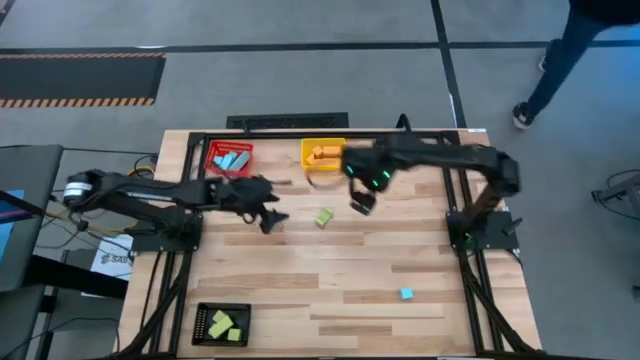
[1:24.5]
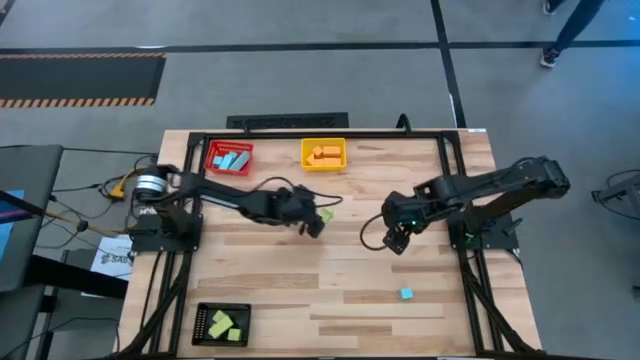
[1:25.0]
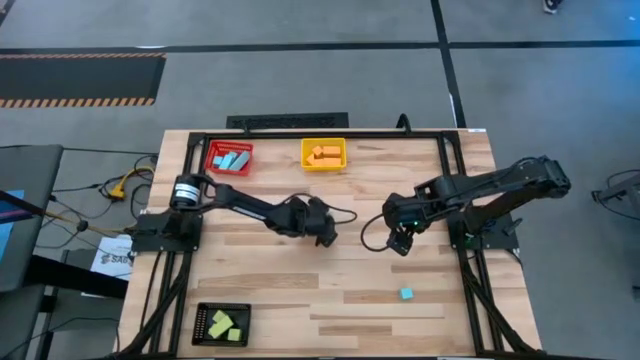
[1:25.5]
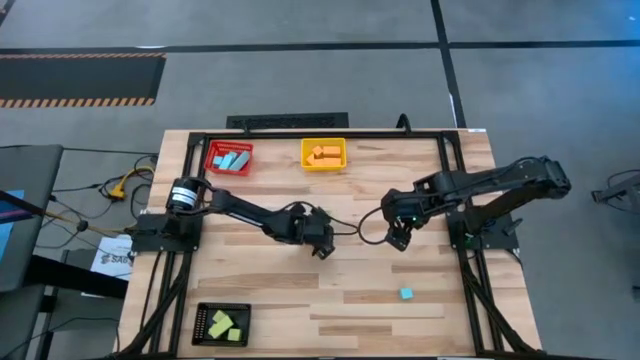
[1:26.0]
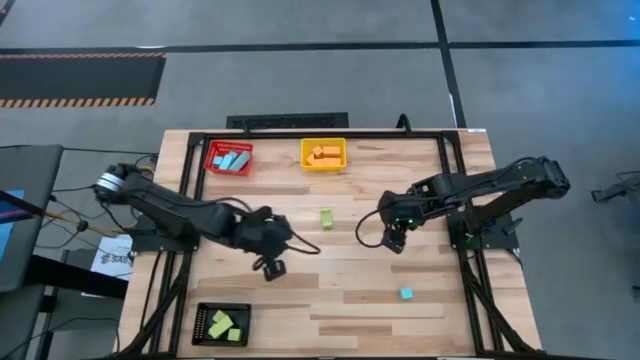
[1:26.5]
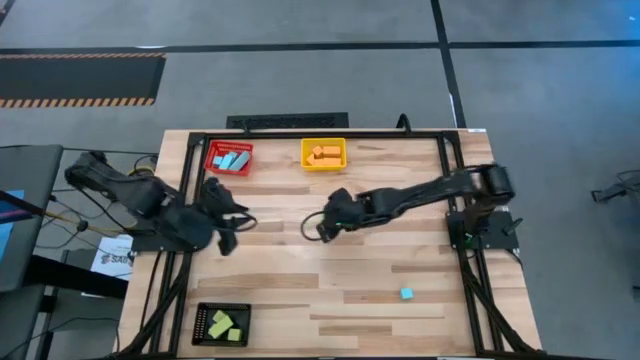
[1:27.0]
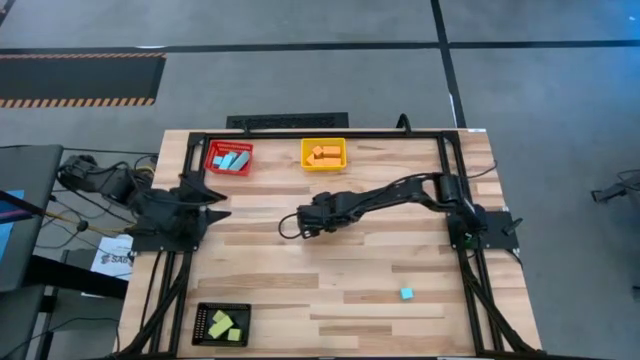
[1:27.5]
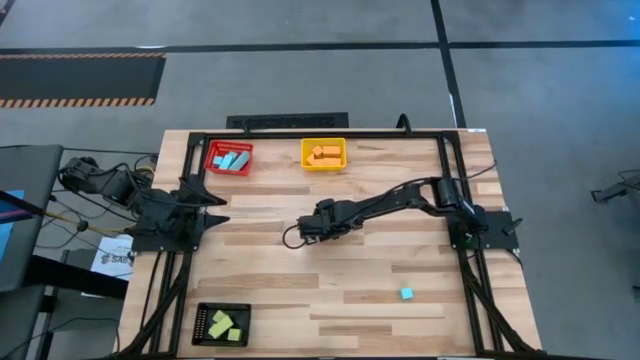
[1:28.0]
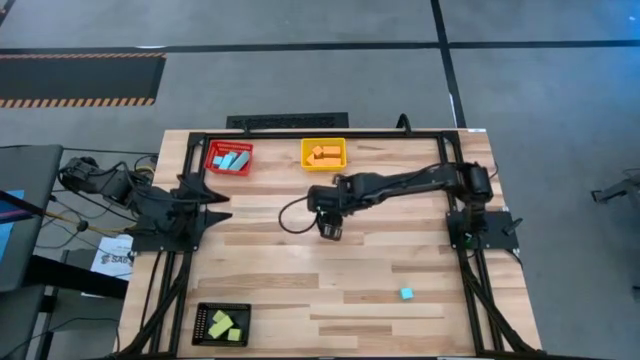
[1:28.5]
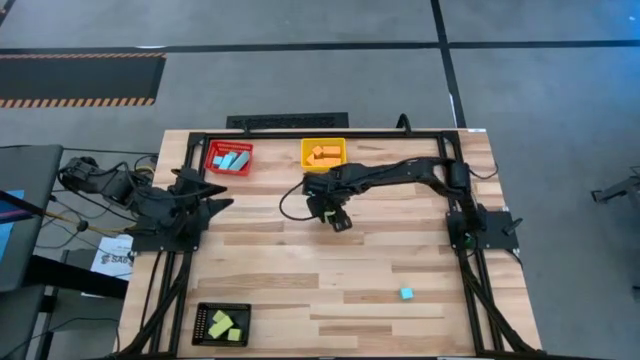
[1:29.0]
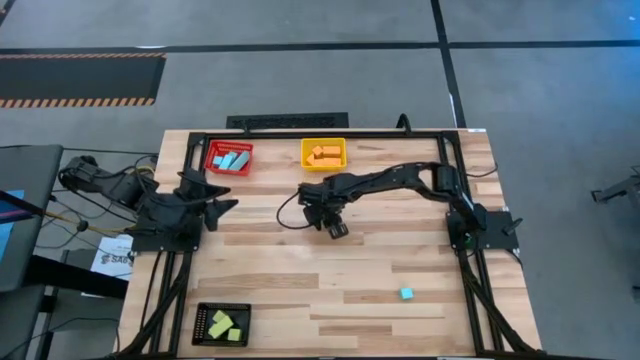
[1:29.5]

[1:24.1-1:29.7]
Task: Sort & place blocks by color
Put the wooden green block into the black bin

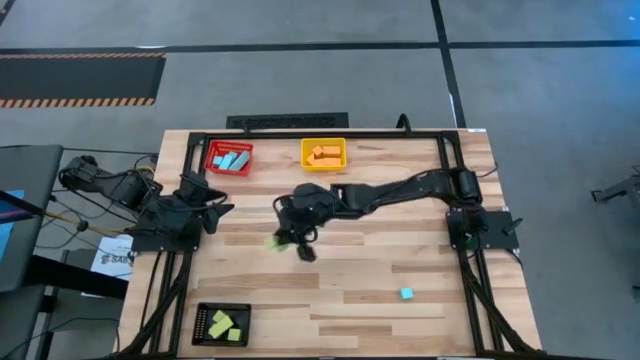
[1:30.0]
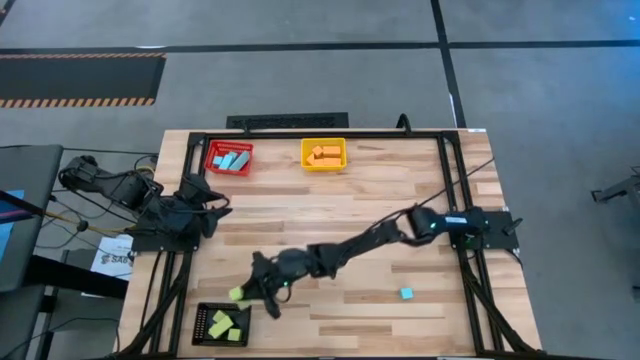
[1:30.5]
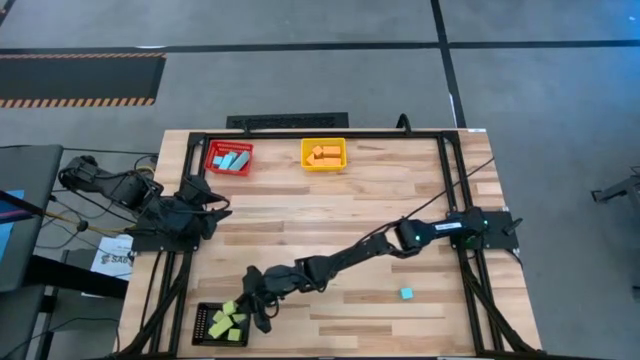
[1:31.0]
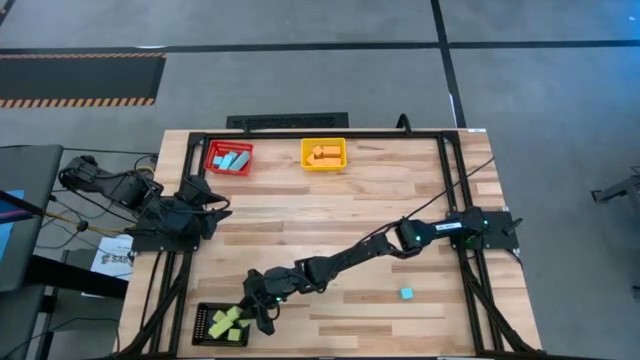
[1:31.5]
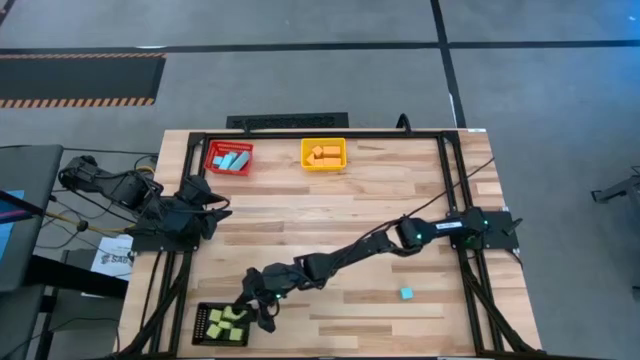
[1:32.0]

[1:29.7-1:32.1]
Put the wooden green block into the black bin

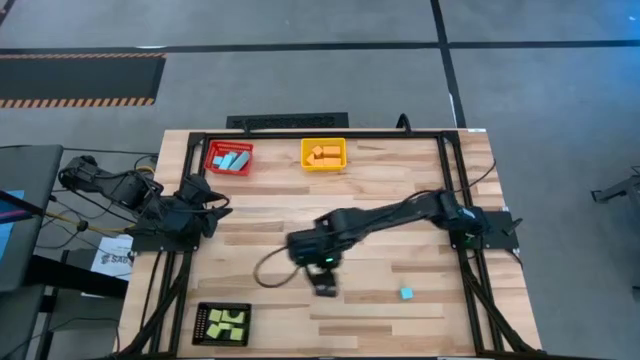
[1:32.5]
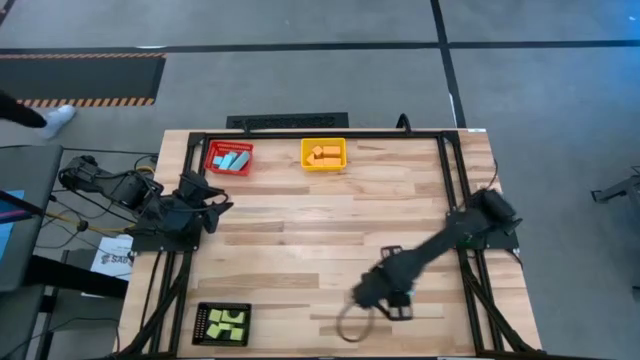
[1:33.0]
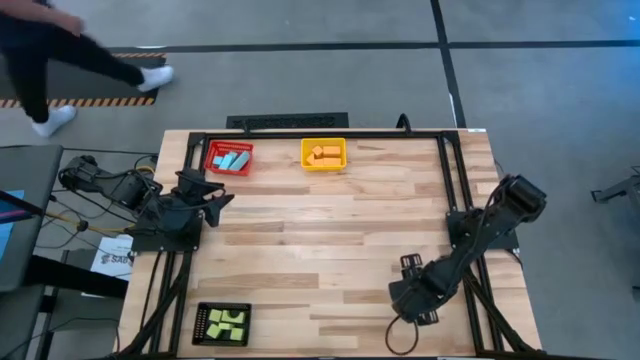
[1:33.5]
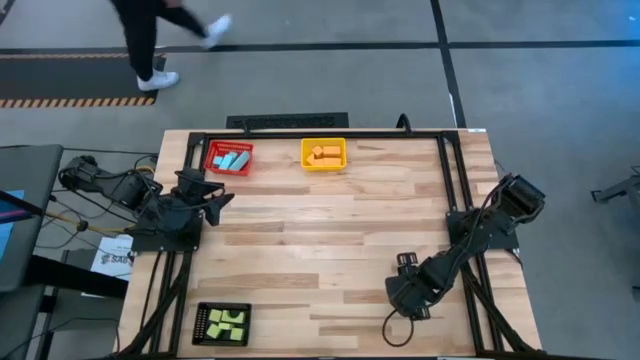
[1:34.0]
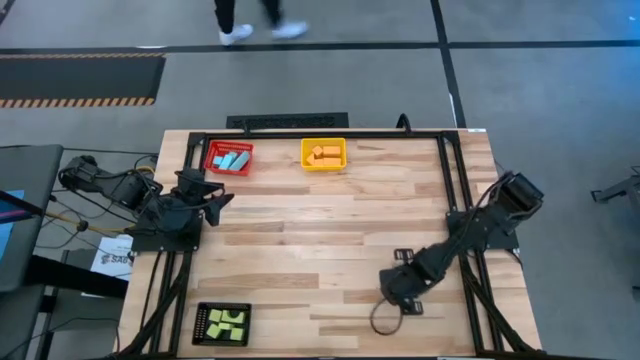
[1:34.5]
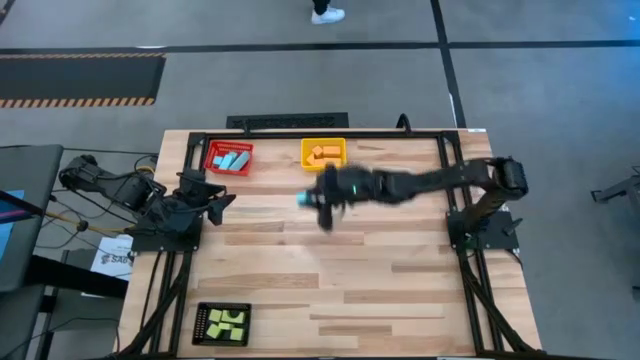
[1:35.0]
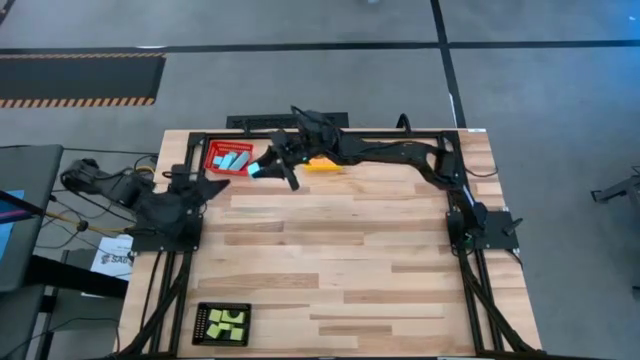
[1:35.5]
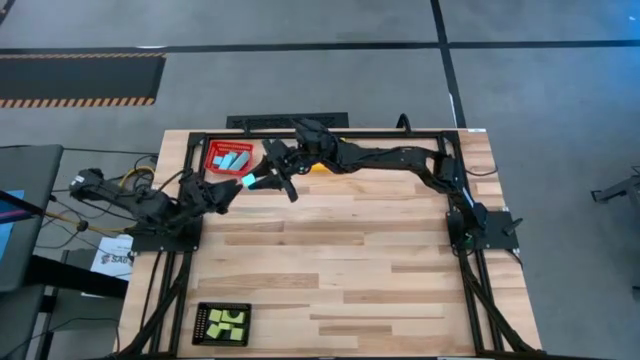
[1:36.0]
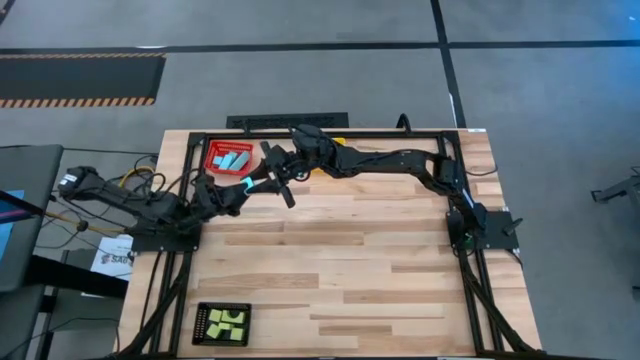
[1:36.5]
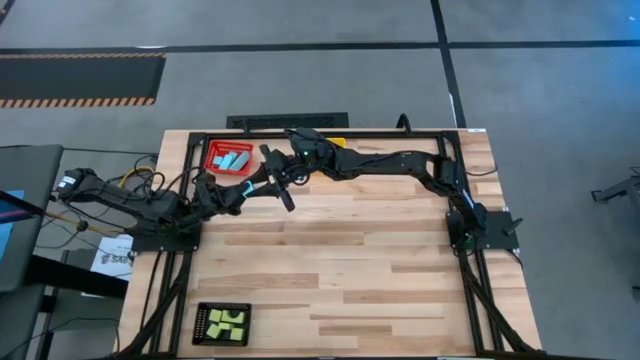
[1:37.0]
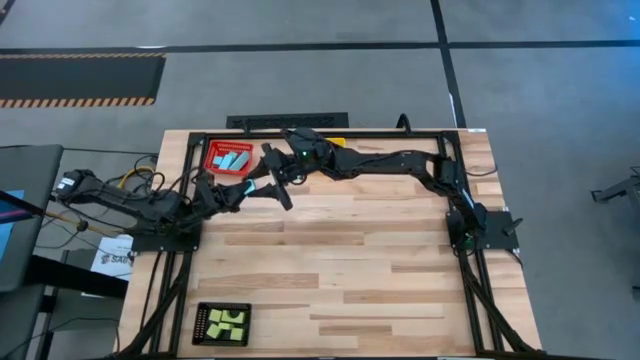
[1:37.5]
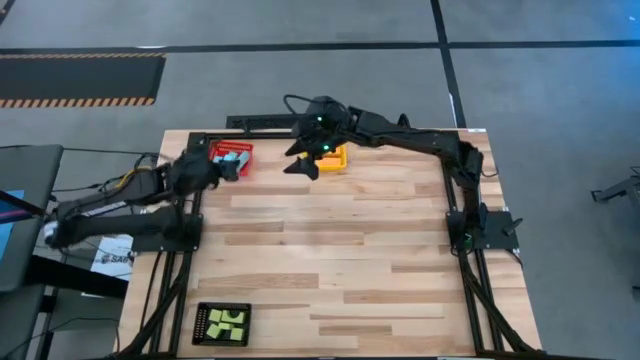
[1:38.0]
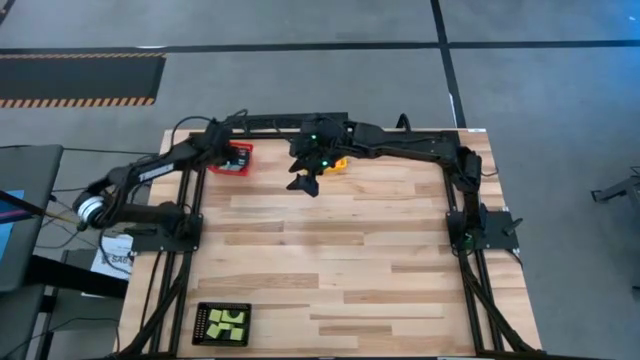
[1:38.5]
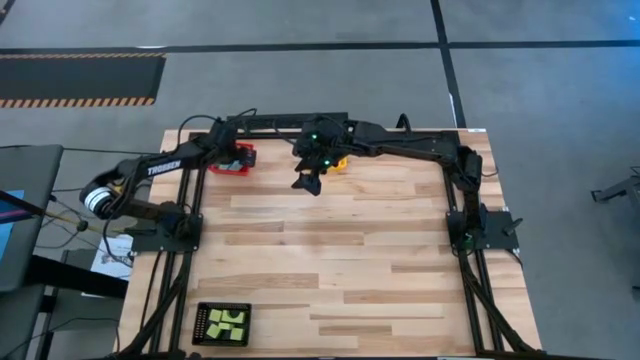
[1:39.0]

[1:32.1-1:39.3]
Put the wooden blue block into the red bin

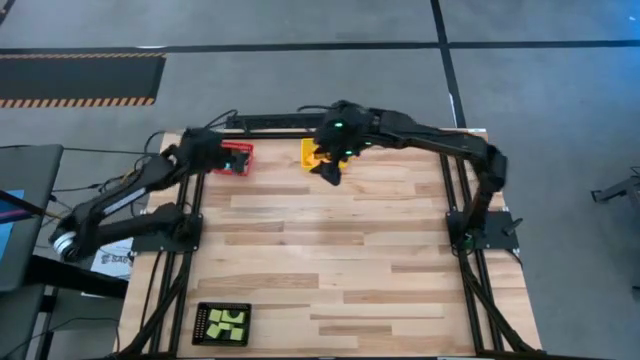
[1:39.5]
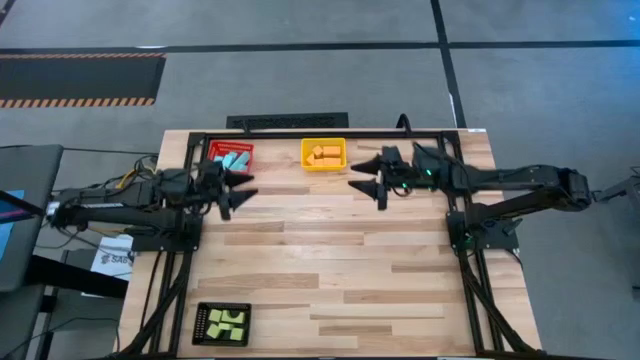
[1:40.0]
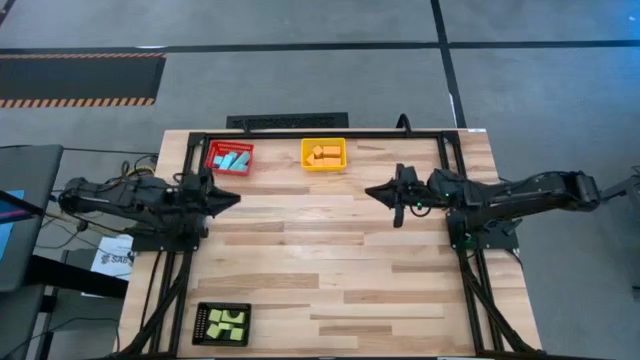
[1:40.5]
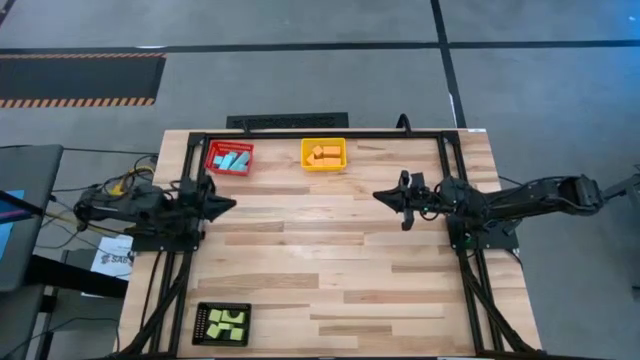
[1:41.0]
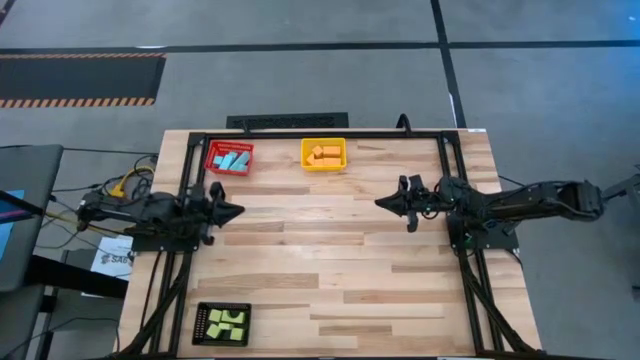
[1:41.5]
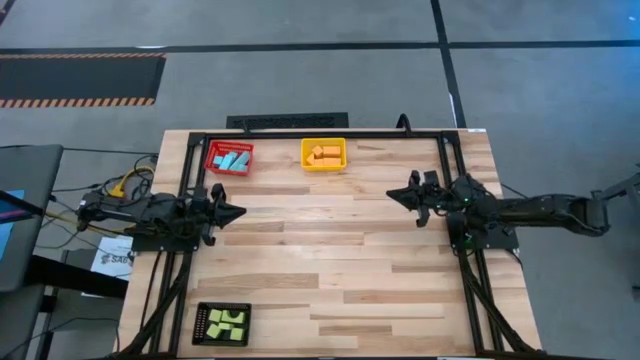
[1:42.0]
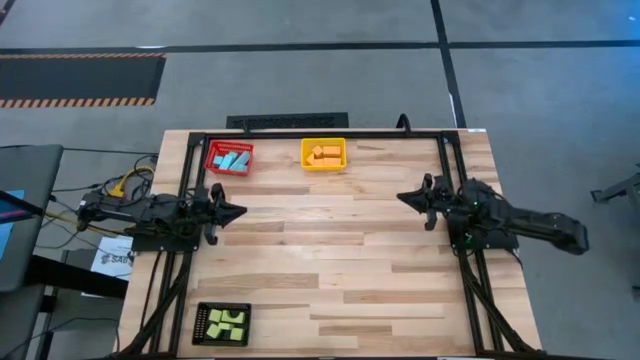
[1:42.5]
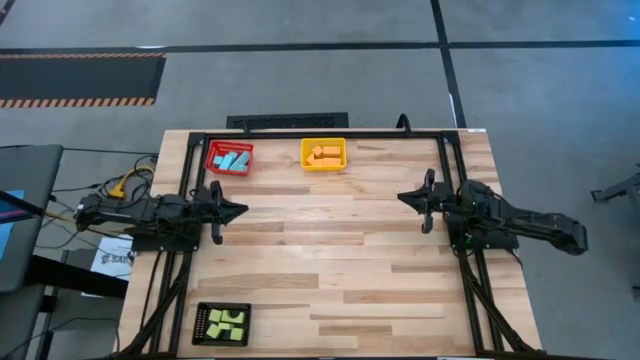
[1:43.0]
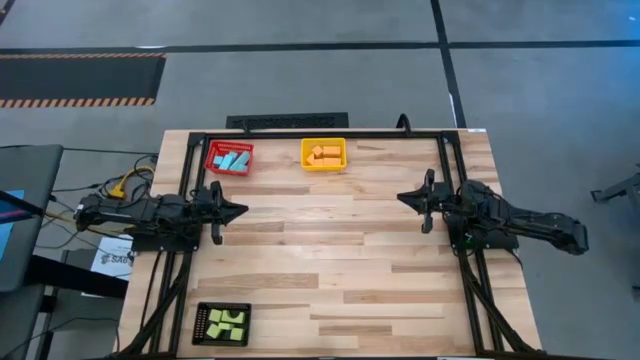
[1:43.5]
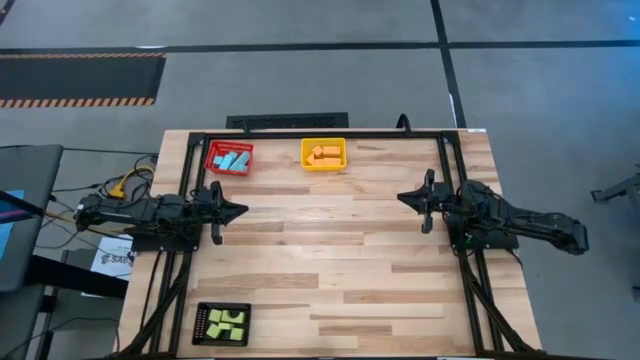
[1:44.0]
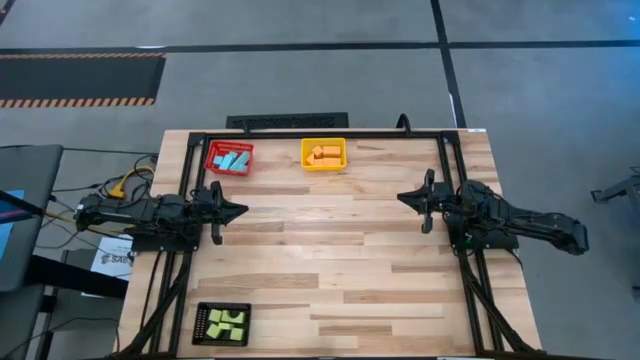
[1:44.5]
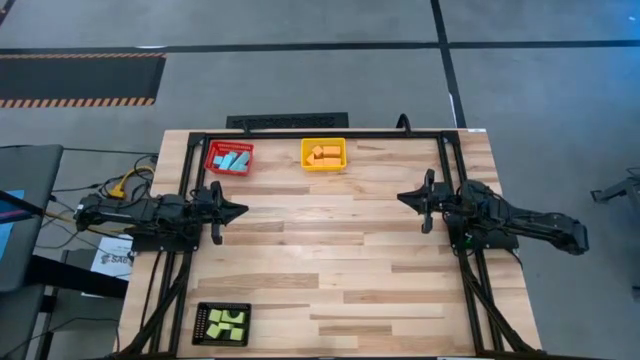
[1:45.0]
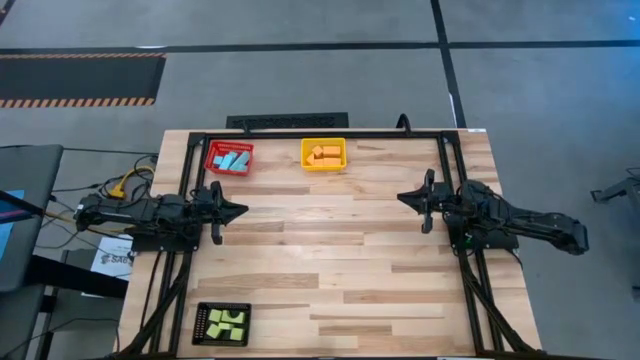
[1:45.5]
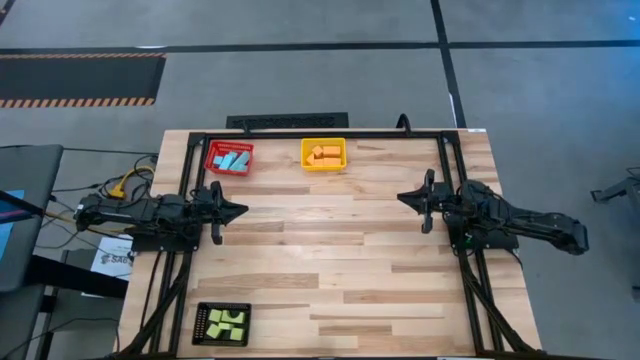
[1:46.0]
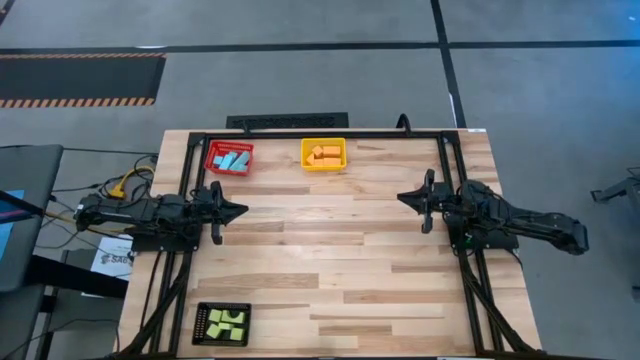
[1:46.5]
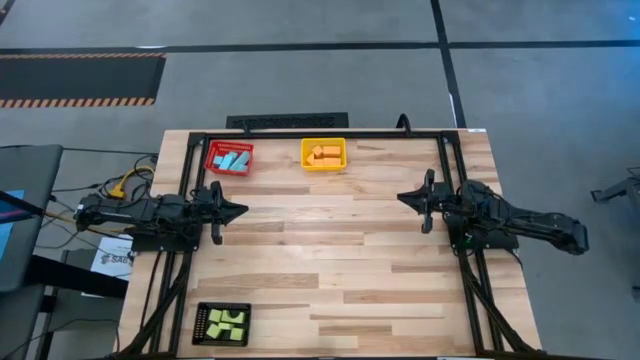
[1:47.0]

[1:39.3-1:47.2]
Return to Home Position
